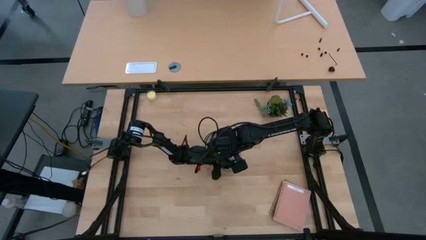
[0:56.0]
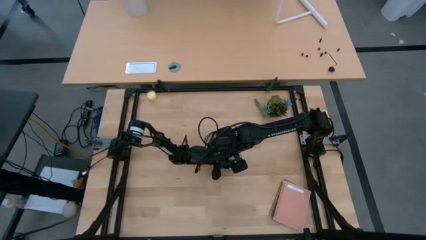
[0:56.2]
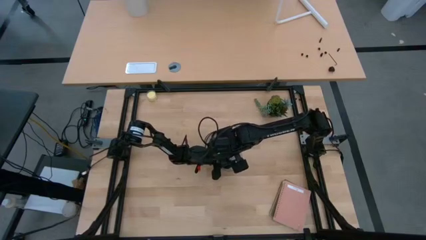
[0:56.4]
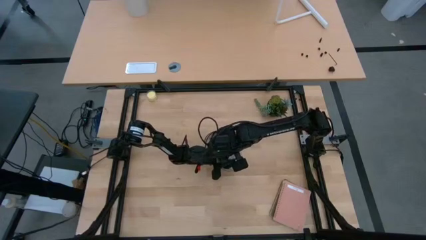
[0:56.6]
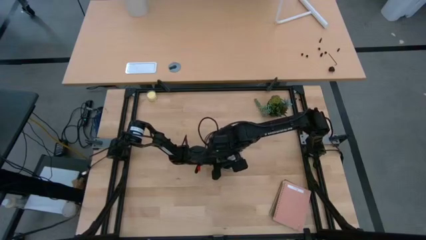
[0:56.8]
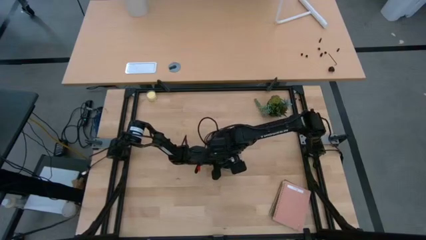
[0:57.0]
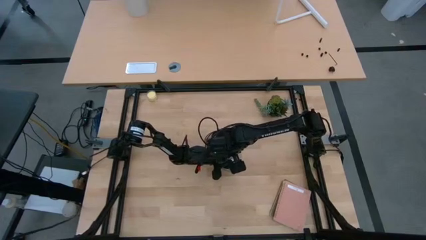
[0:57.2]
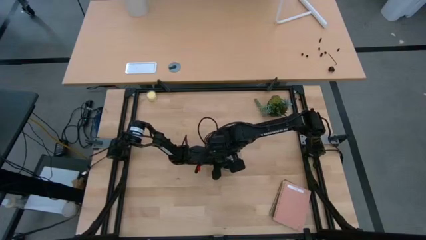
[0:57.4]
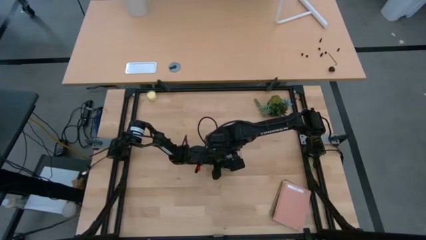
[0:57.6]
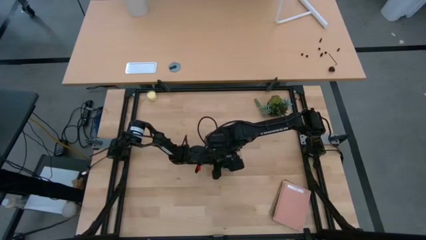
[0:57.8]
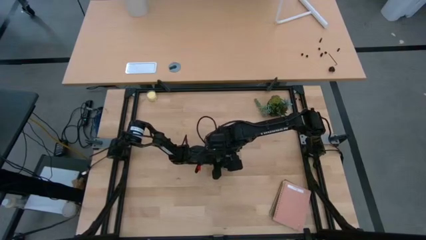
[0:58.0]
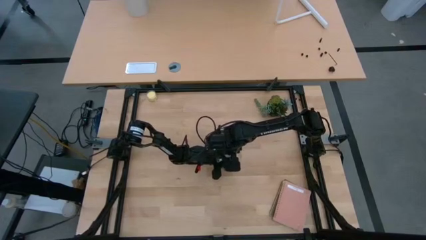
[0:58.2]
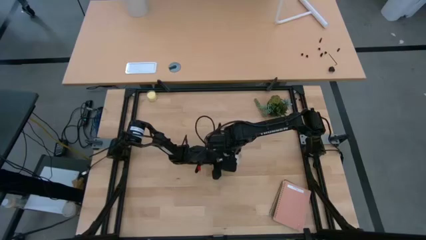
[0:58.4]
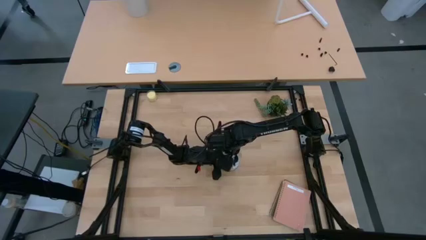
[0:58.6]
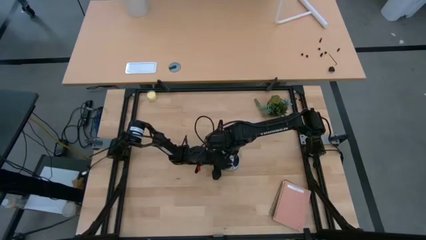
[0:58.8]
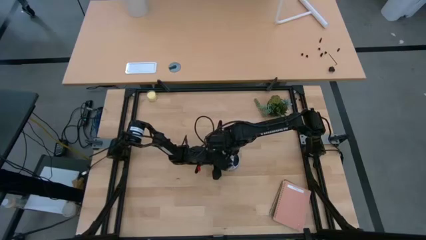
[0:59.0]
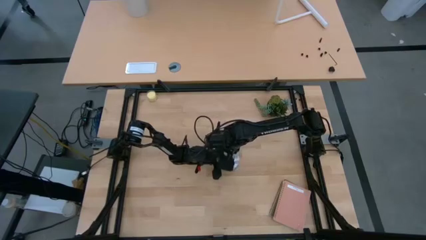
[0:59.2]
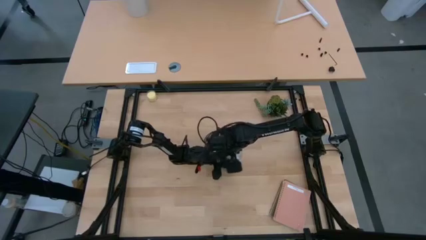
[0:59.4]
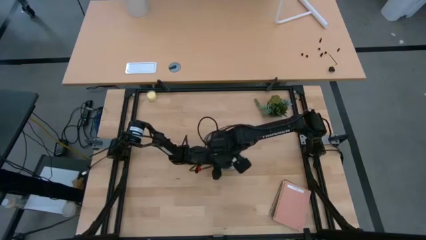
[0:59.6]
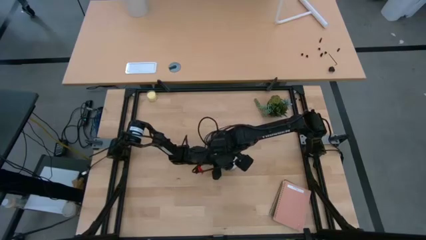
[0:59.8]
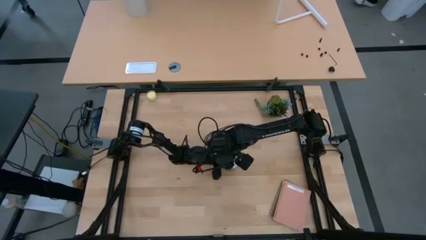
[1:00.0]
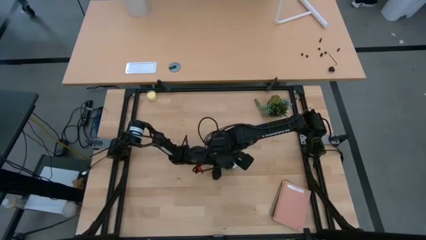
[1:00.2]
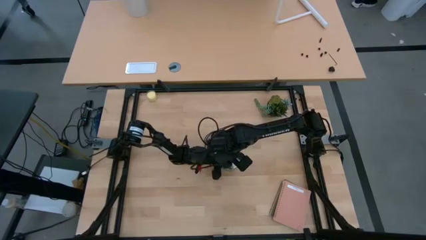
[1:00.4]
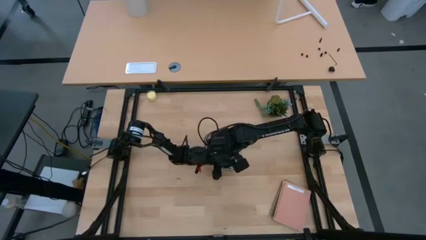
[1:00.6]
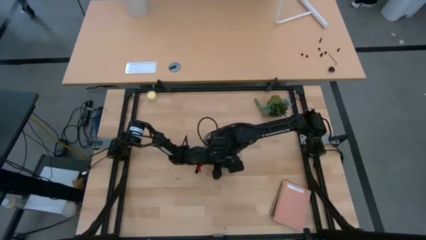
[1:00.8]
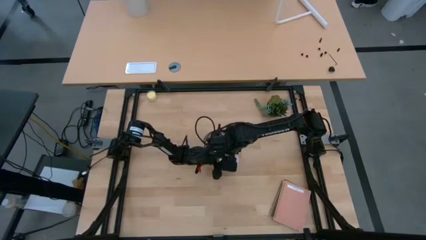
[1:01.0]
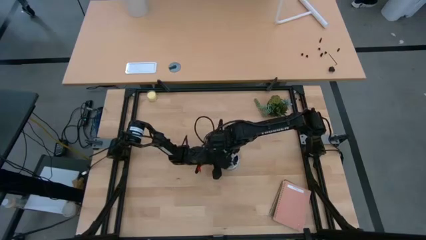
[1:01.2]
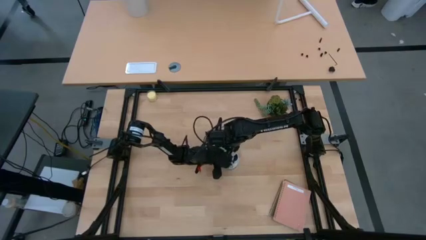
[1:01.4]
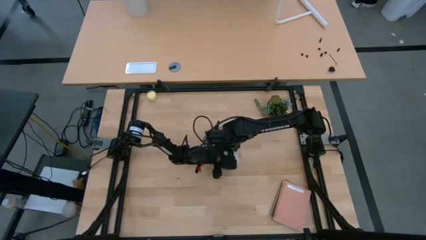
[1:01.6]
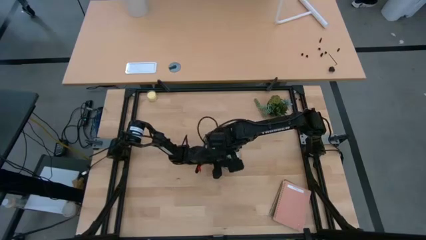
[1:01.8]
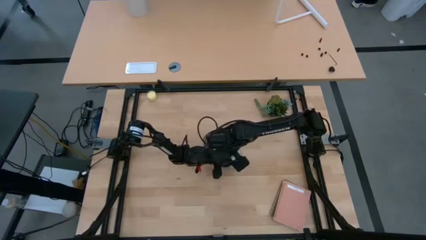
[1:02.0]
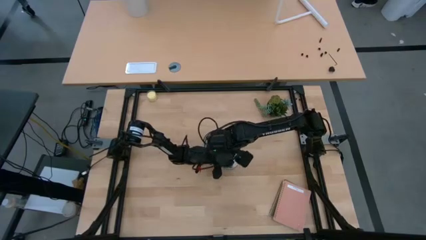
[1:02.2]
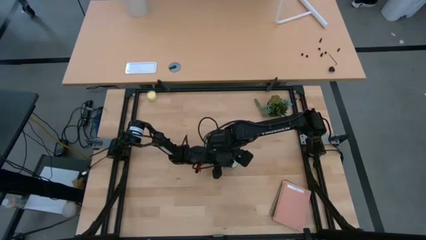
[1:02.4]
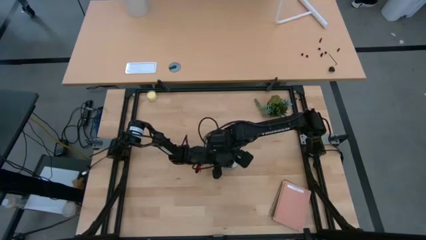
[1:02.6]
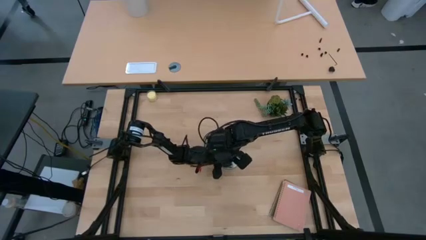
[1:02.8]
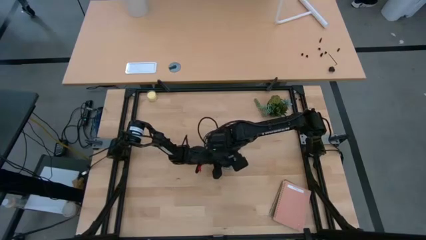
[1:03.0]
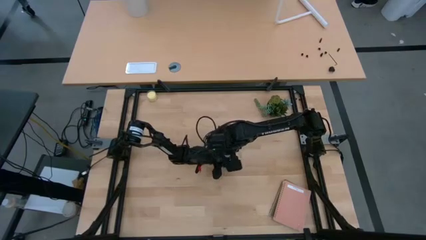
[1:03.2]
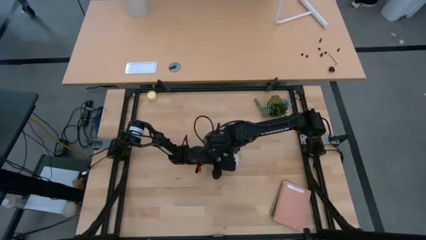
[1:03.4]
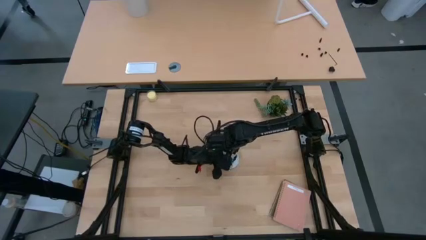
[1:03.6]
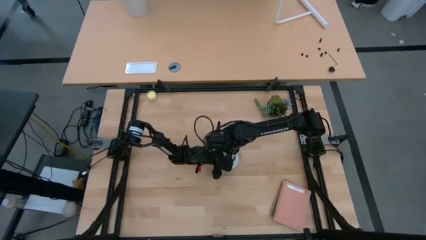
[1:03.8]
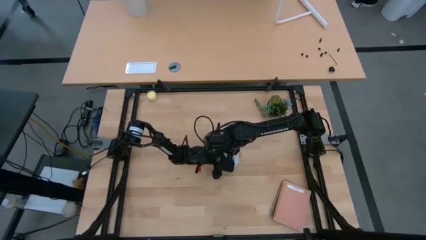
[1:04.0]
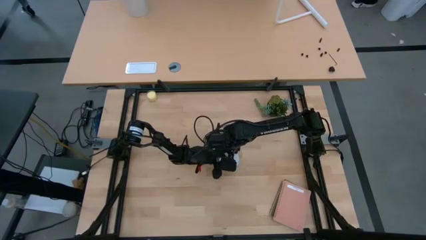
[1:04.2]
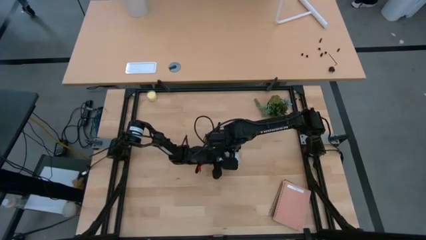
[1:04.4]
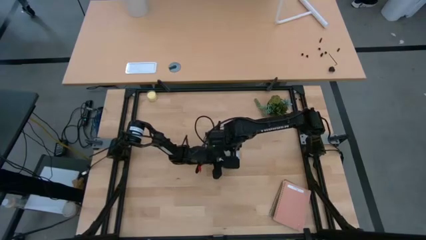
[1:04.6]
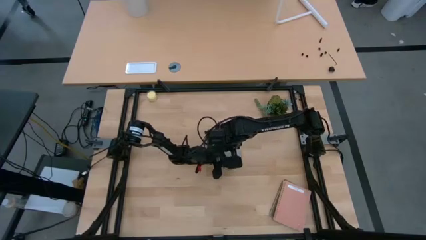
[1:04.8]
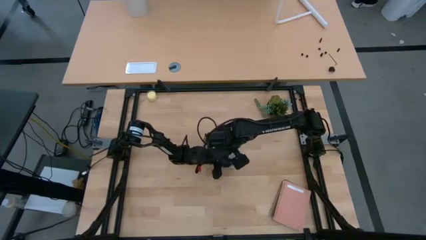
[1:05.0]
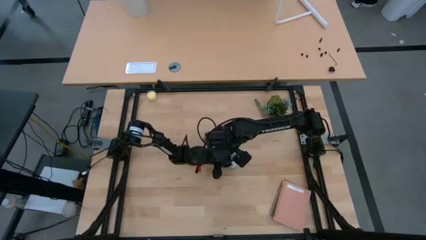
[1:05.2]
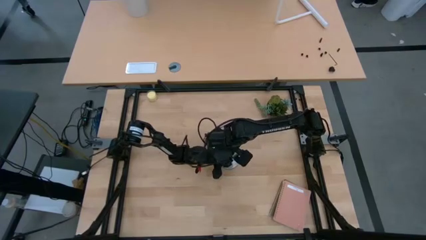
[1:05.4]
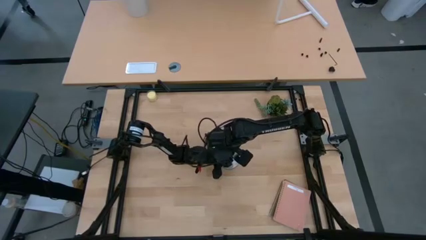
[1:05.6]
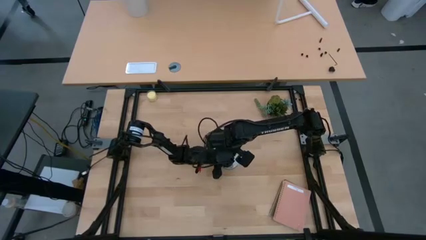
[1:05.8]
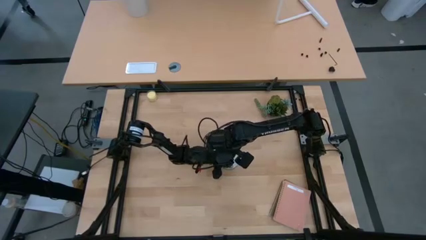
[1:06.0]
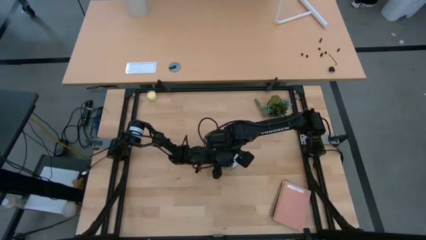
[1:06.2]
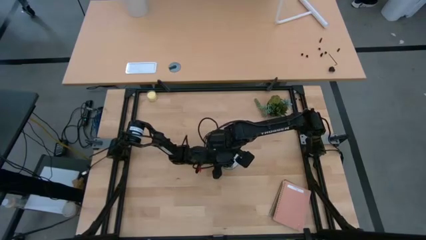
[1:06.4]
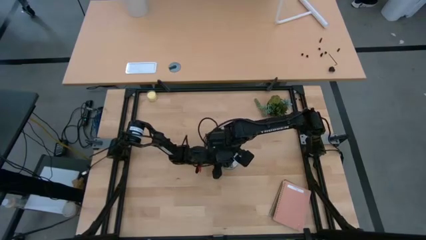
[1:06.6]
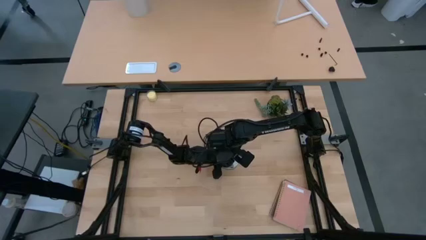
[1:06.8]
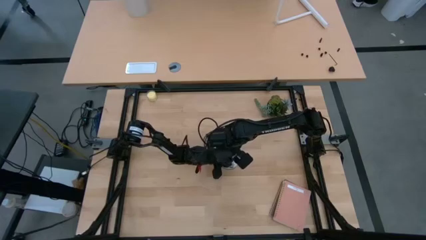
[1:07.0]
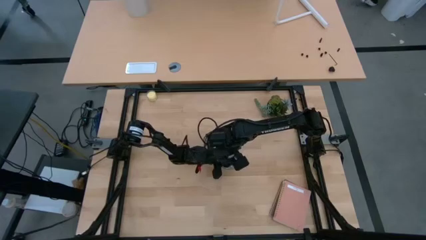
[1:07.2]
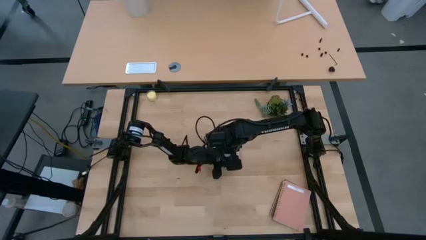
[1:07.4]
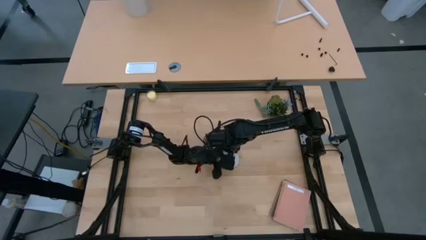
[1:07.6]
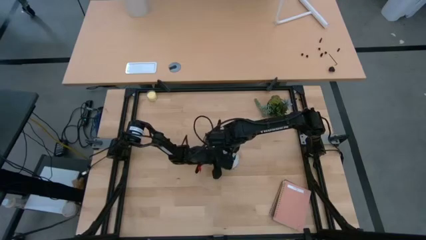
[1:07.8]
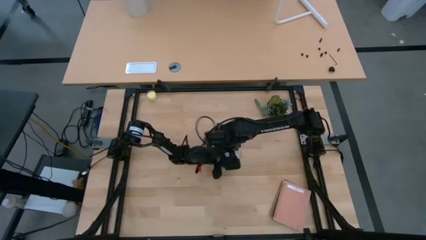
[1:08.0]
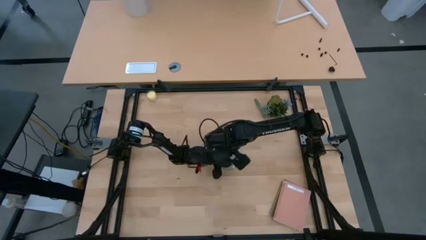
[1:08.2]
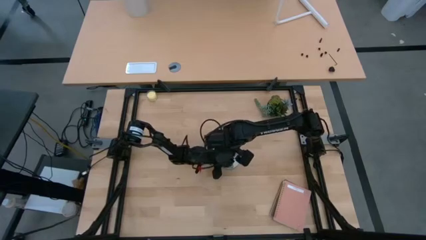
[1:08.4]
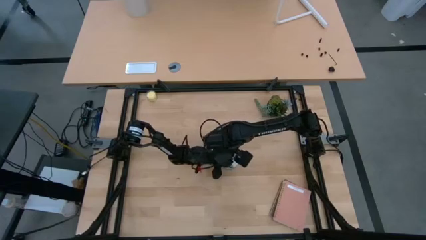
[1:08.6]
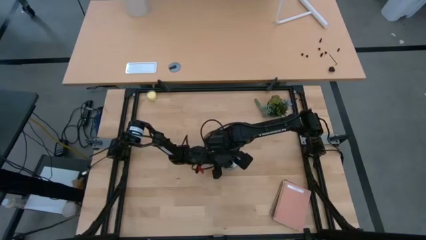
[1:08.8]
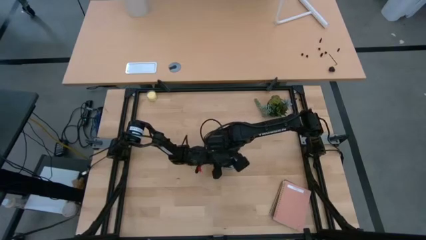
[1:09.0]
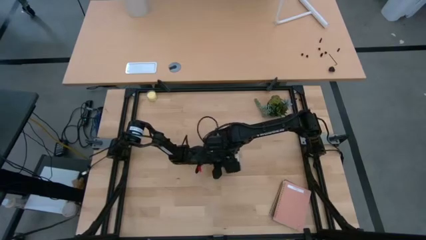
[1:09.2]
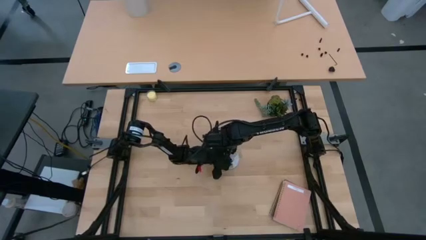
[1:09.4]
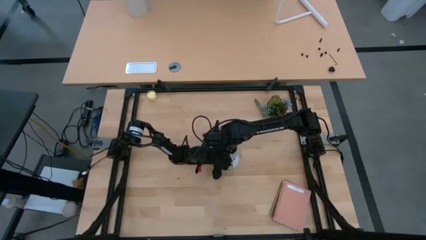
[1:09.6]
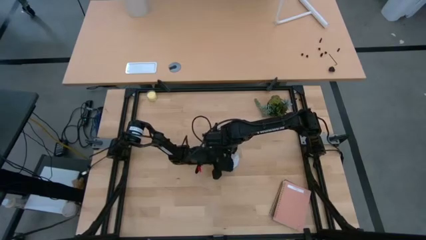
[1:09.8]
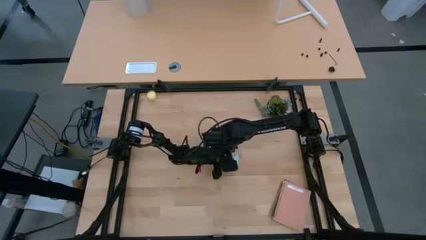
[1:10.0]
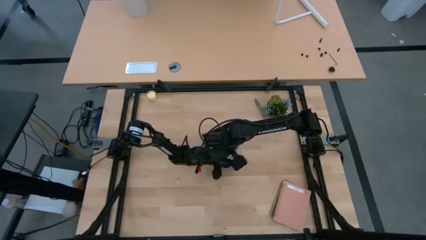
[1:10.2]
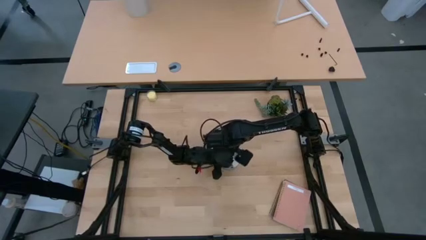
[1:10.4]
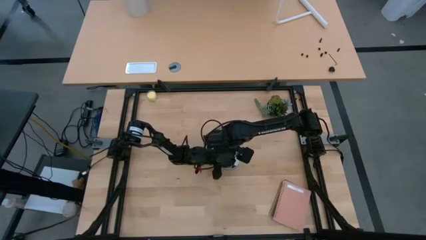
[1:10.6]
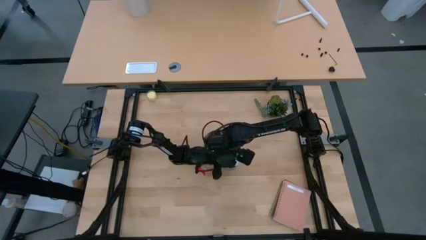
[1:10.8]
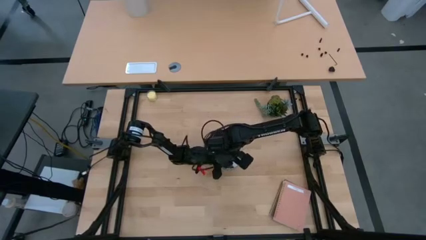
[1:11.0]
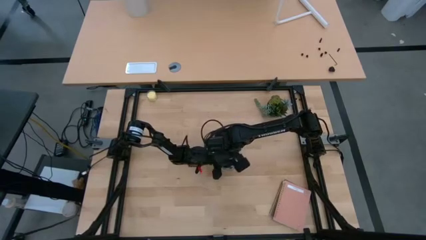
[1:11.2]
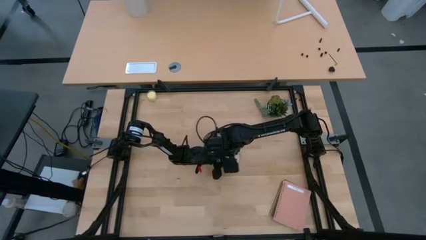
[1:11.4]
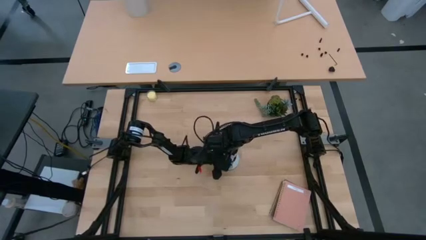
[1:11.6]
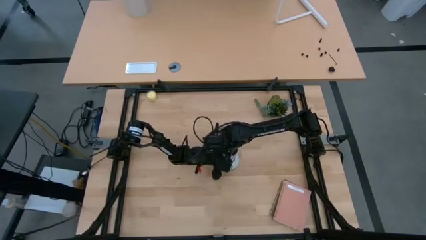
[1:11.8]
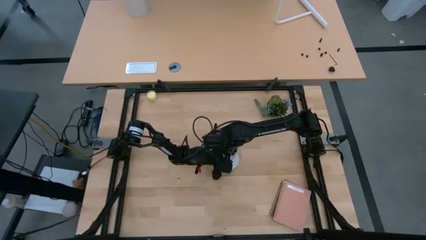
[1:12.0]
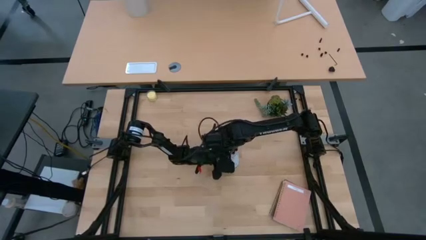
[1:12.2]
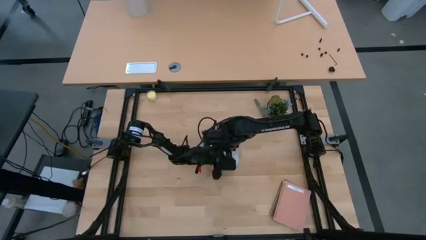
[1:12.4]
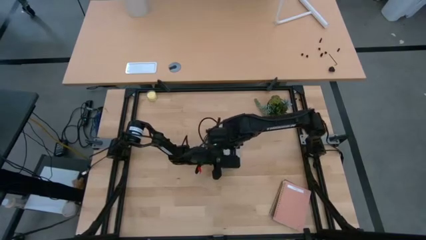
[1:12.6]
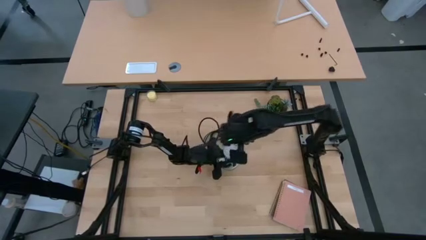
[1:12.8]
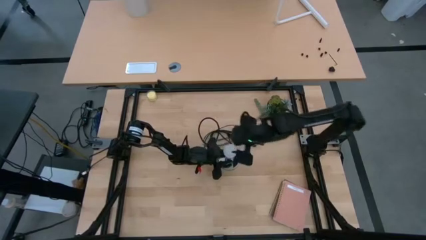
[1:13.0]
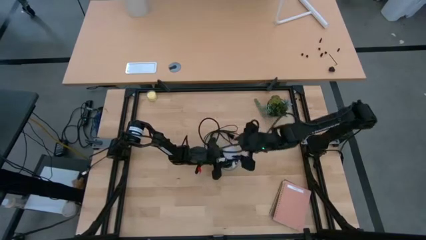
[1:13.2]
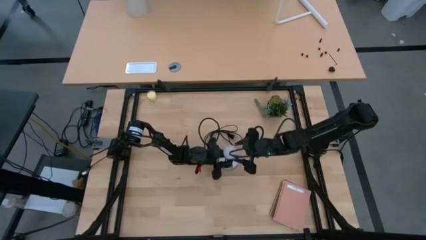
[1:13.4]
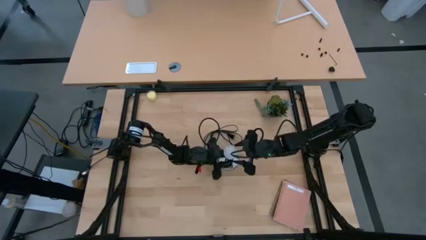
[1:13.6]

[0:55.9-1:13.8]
Task: Screw lightbulb
Insert the white lightbulb into the lamp
